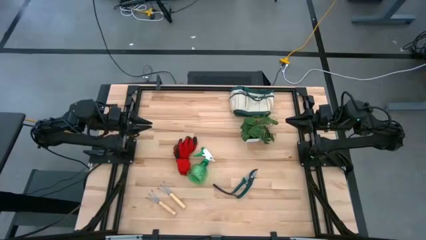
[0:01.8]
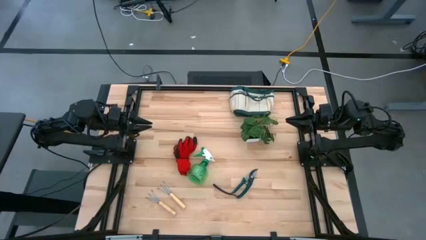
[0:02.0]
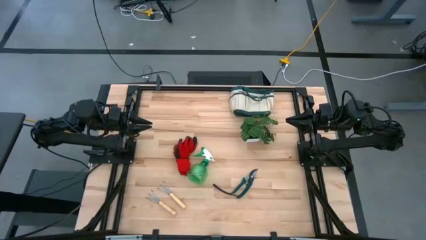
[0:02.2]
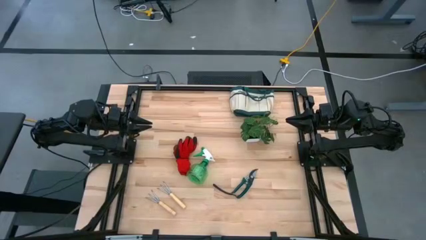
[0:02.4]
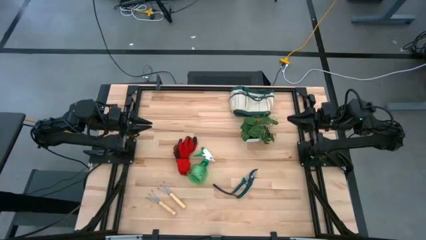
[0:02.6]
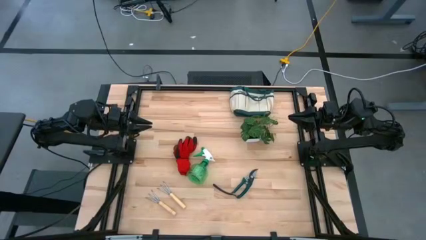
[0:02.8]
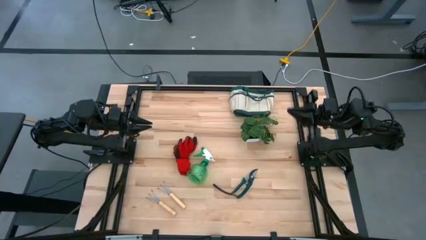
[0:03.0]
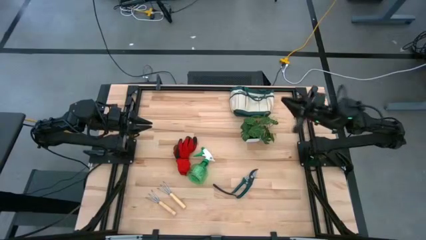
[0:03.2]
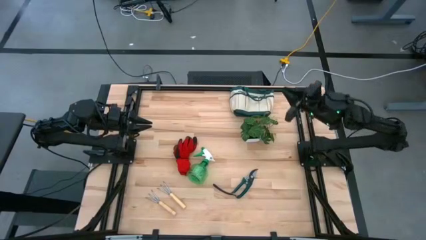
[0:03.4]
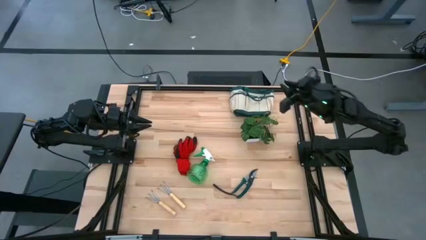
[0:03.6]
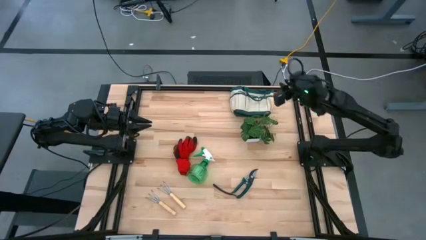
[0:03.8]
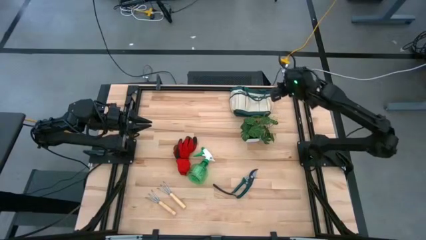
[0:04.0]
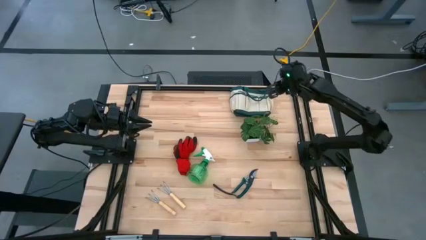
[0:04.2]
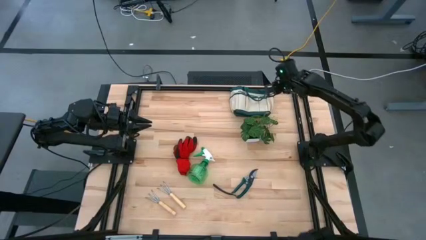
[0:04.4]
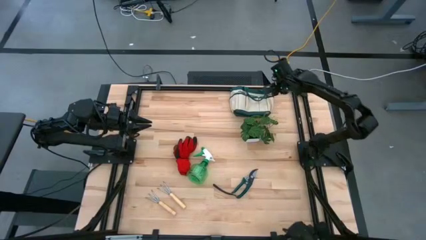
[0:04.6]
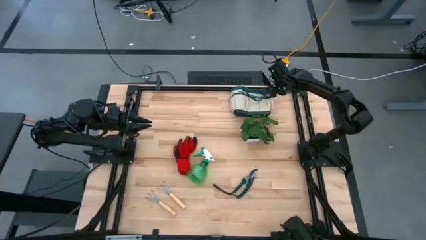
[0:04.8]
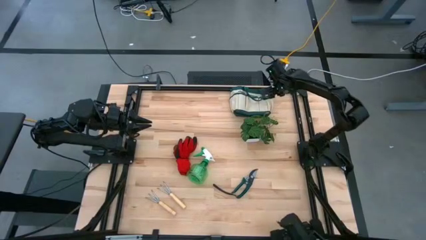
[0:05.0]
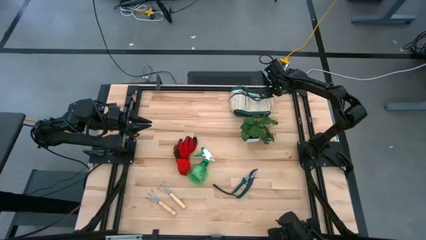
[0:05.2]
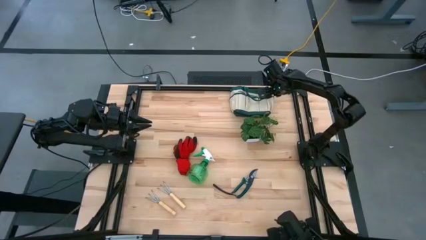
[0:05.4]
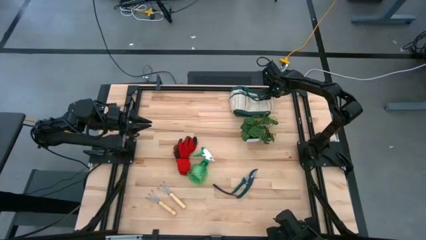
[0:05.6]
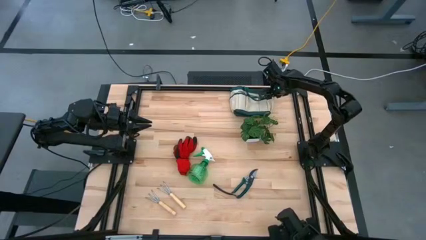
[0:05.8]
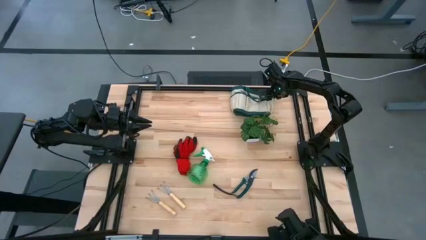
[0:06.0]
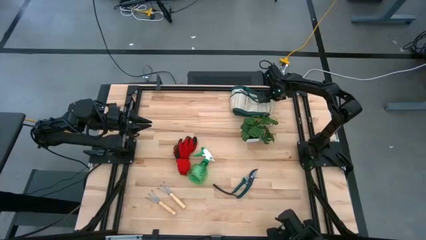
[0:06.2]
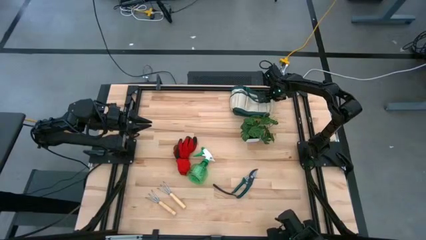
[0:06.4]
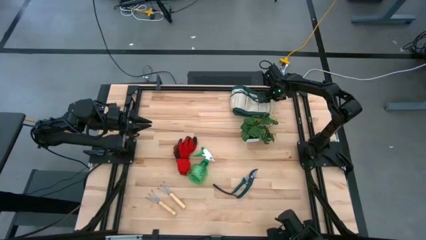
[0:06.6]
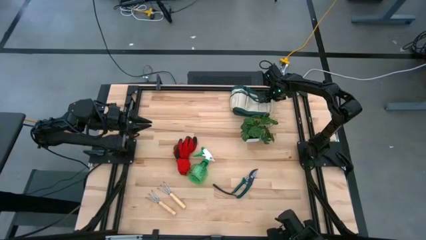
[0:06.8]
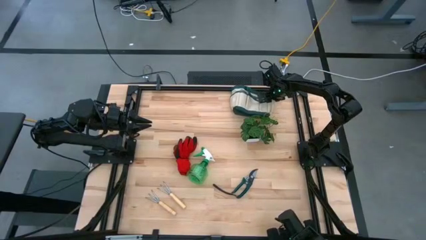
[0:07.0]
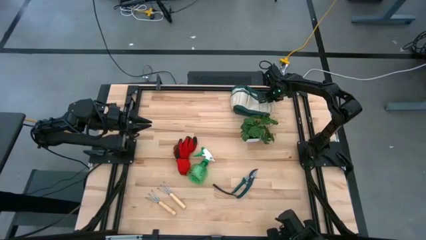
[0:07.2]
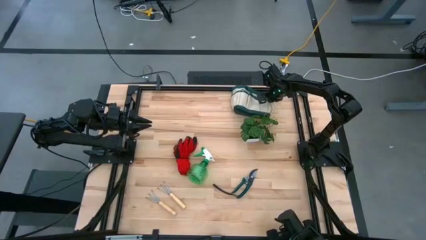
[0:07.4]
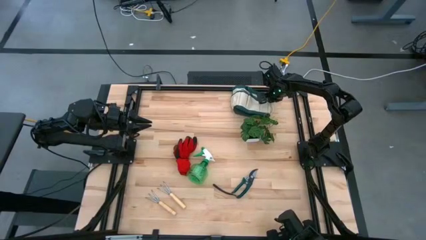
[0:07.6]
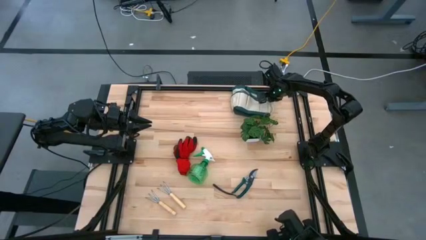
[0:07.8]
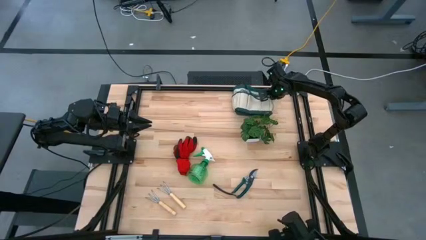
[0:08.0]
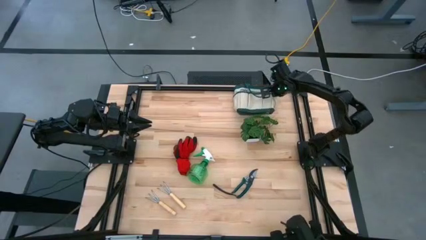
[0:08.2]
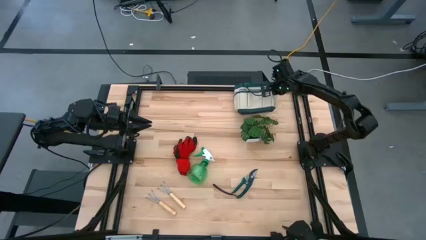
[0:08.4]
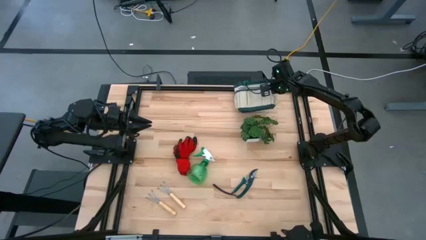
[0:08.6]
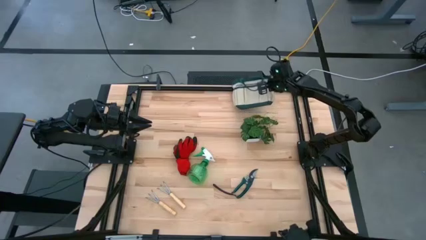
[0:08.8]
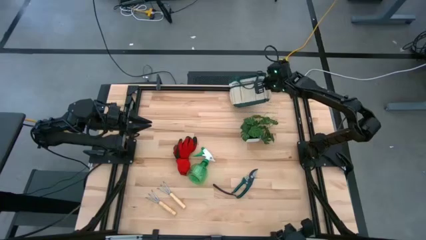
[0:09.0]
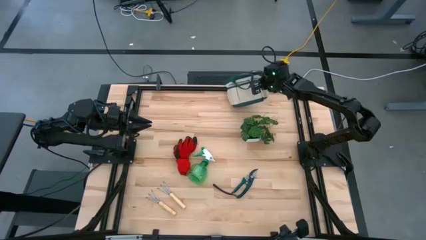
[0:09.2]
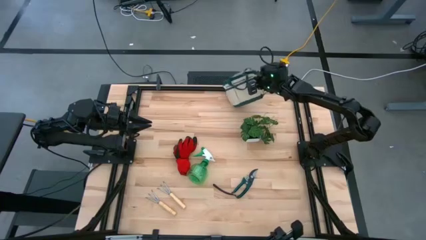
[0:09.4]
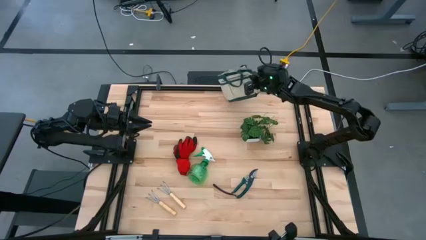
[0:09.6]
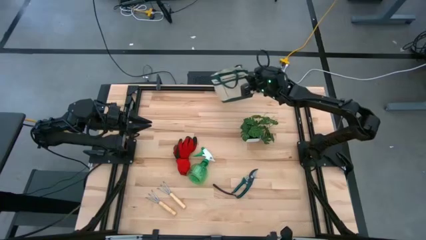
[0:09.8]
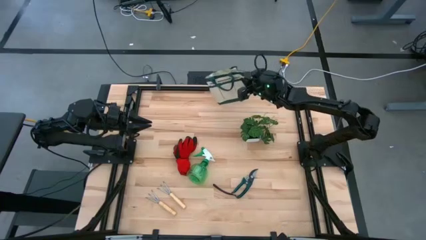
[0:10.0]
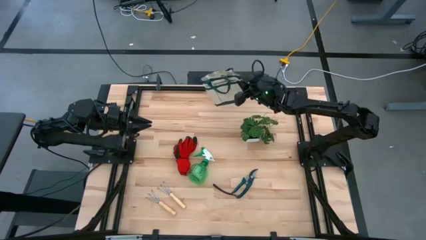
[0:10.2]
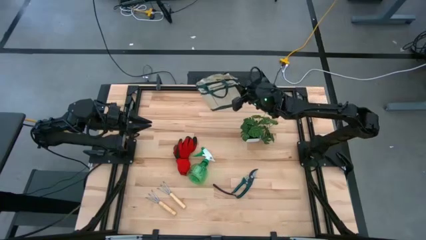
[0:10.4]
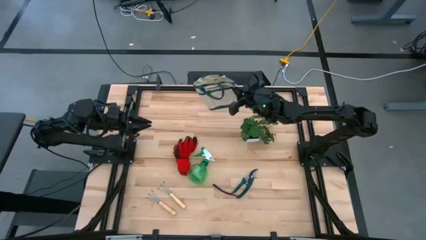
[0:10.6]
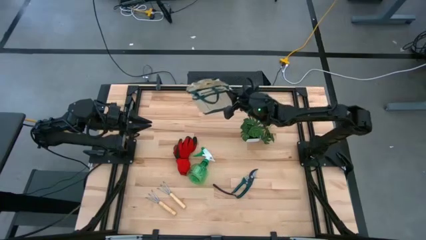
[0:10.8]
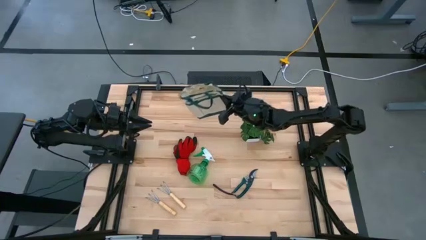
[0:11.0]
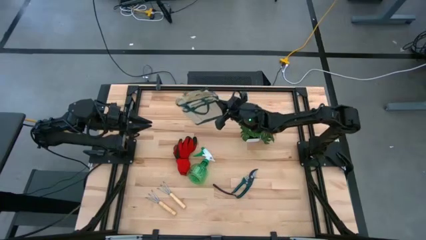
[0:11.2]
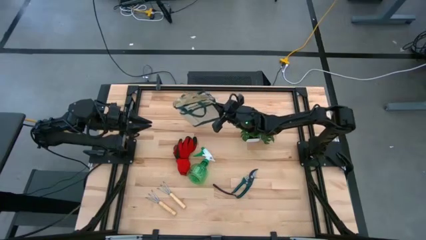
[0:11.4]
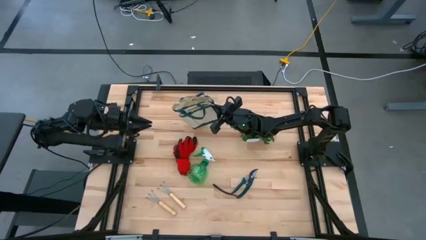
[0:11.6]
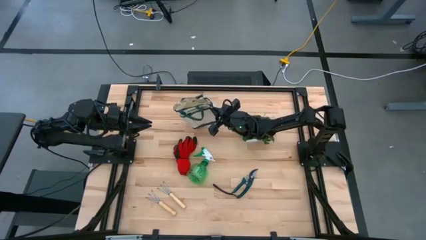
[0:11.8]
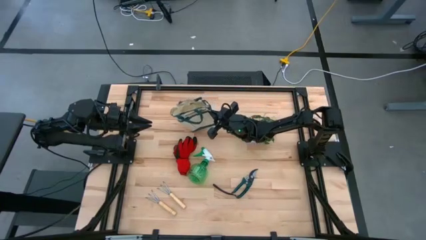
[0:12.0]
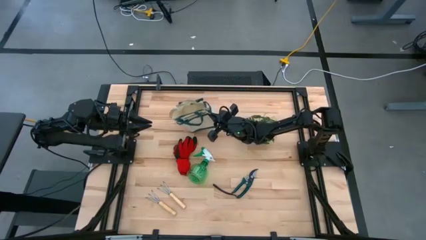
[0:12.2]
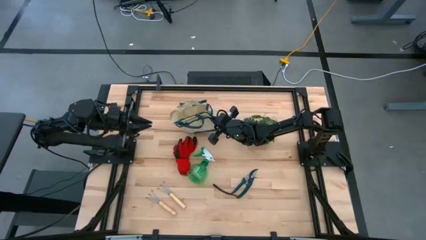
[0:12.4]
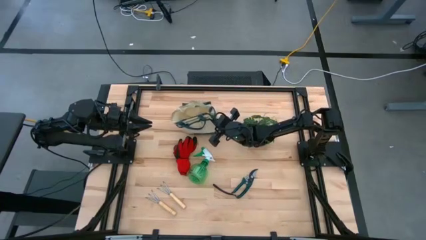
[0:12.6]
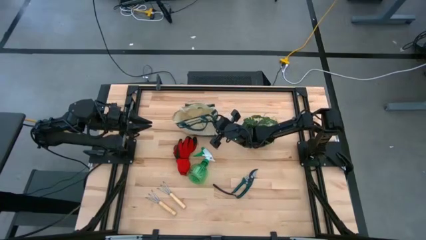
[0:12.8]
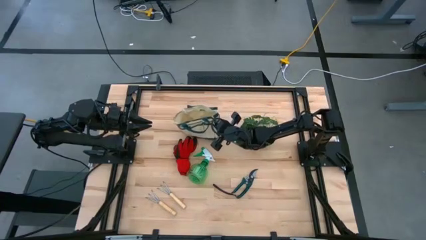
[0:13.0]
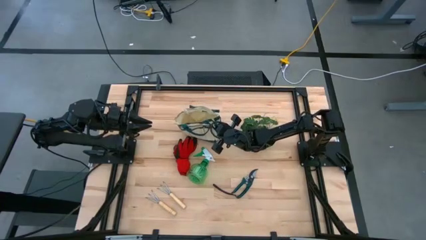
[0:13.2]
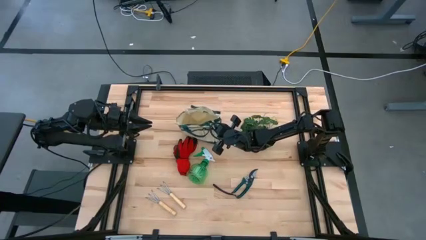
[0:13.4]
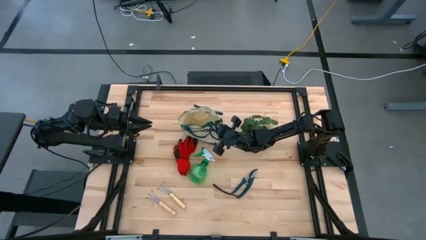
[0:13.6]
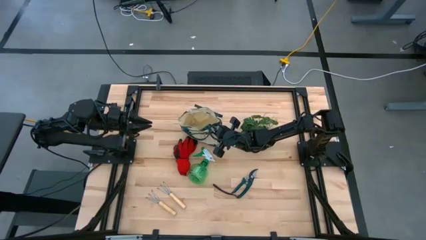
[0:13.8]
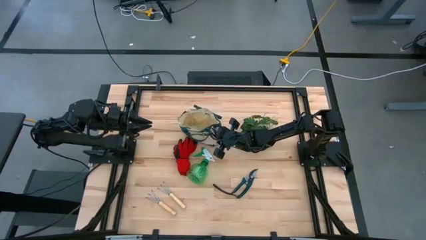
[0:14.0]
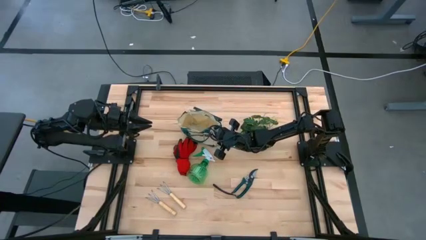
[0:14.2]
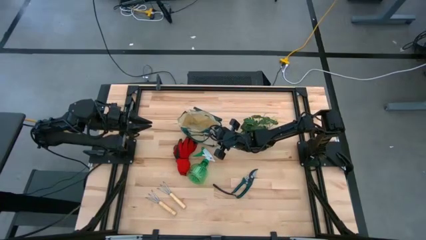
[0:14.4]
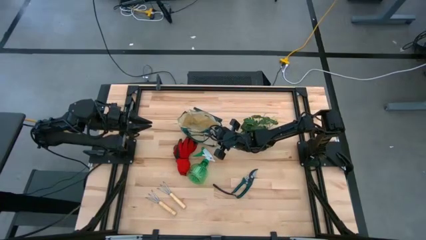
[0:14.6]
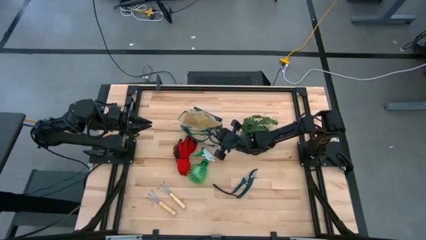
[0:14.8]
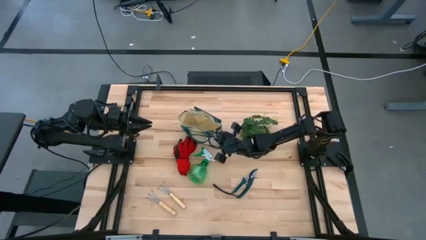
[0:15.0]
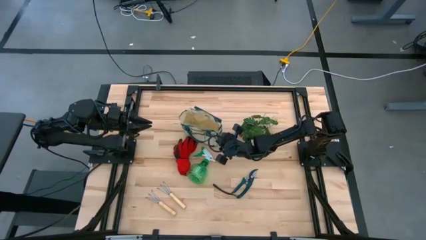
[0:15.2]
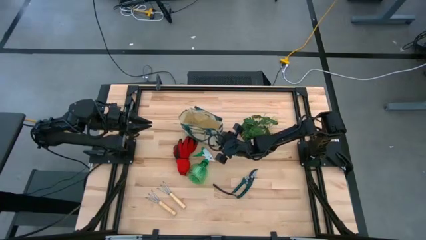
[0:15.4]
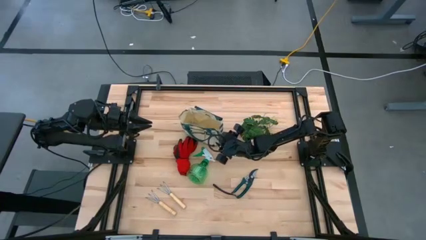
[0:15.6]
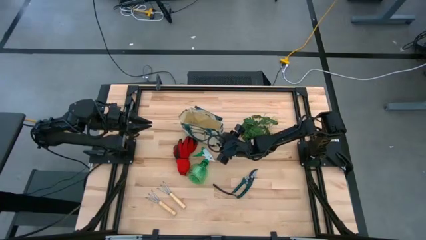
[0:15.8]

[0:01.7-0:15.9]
Task: Pick & Place Garden tools in Gardening bag
Prepare the green gardening bag
